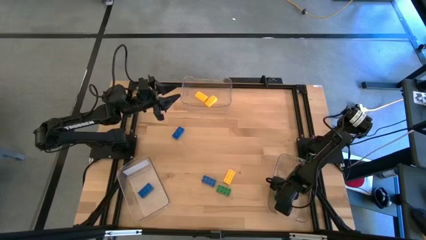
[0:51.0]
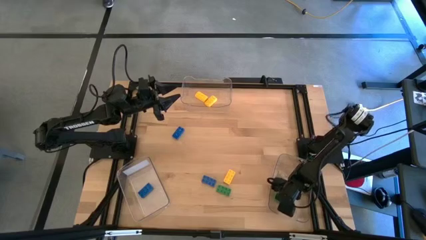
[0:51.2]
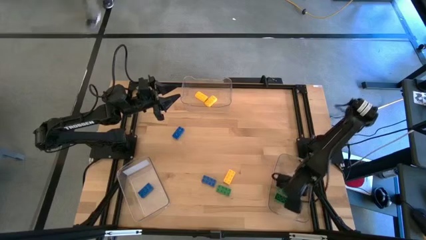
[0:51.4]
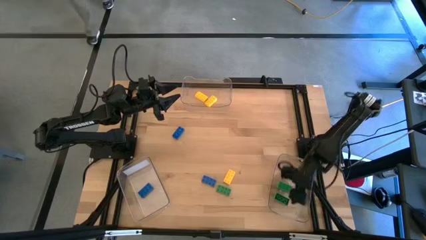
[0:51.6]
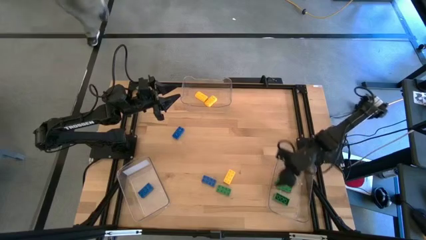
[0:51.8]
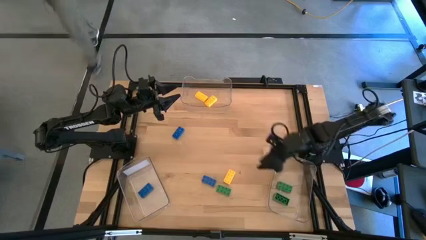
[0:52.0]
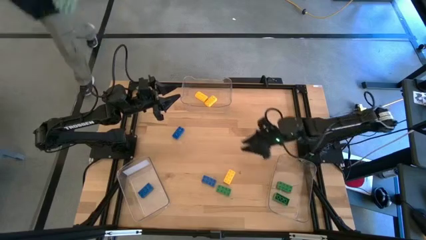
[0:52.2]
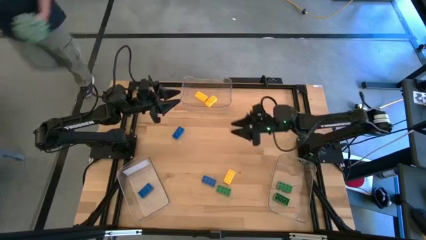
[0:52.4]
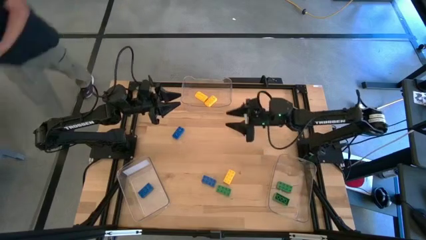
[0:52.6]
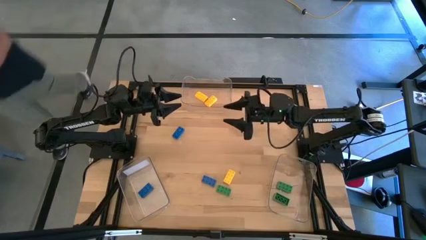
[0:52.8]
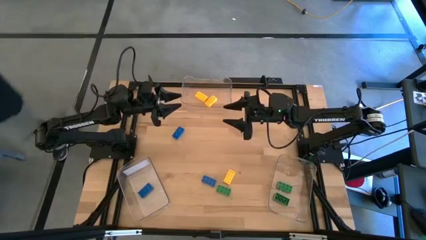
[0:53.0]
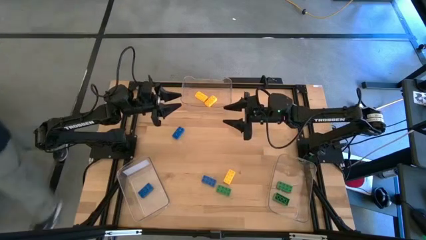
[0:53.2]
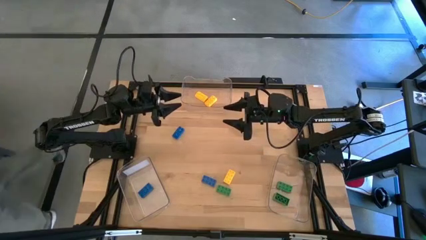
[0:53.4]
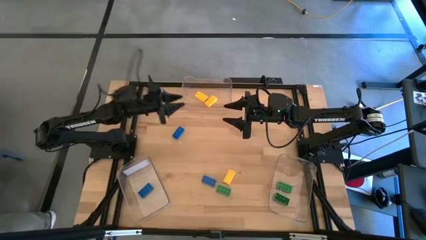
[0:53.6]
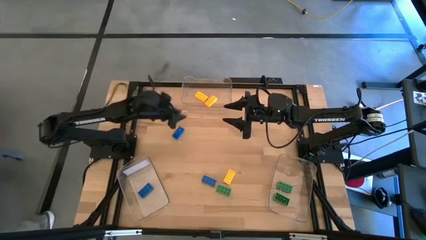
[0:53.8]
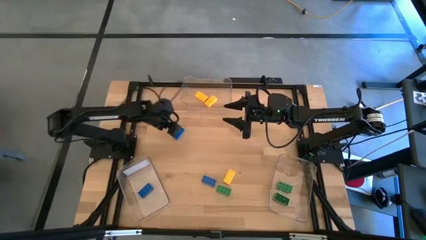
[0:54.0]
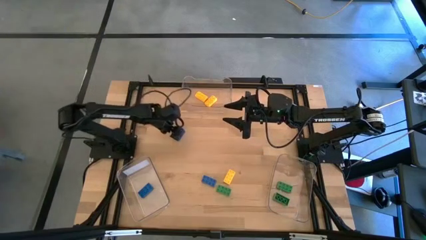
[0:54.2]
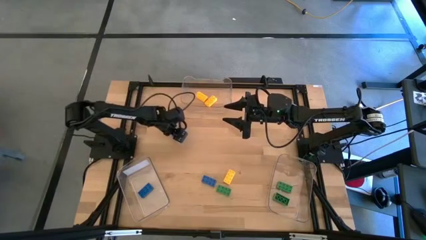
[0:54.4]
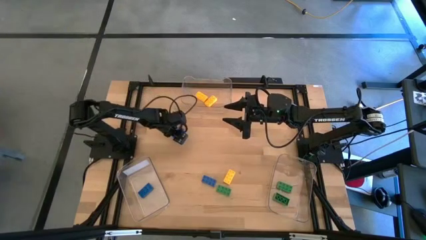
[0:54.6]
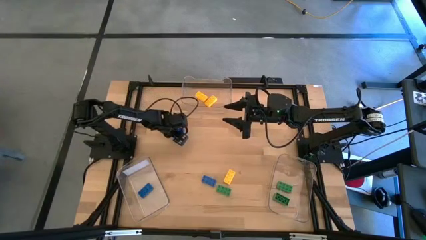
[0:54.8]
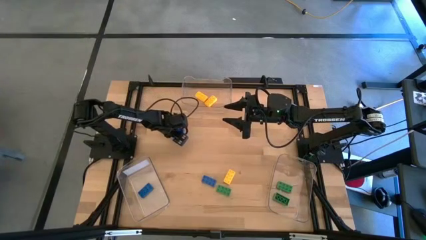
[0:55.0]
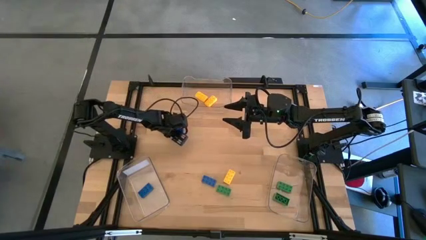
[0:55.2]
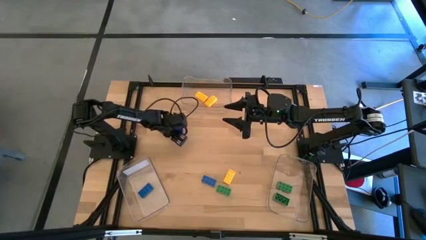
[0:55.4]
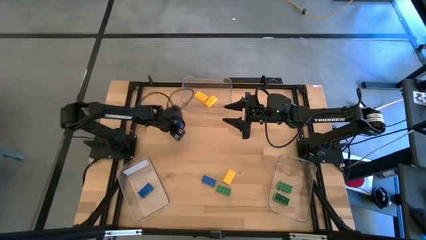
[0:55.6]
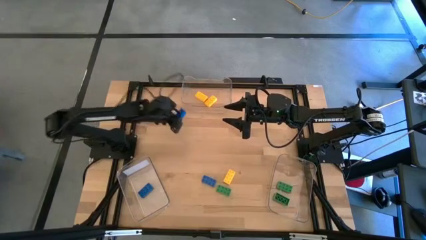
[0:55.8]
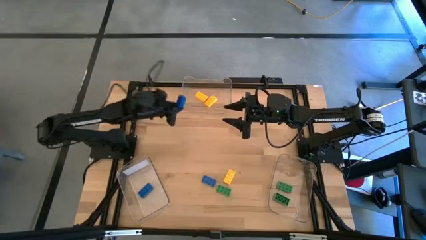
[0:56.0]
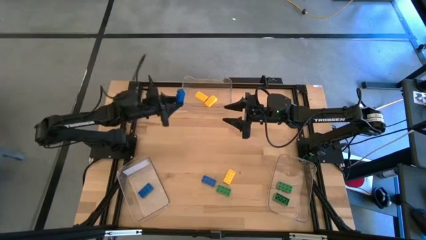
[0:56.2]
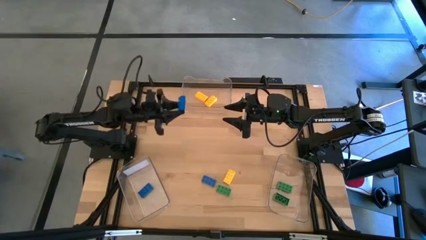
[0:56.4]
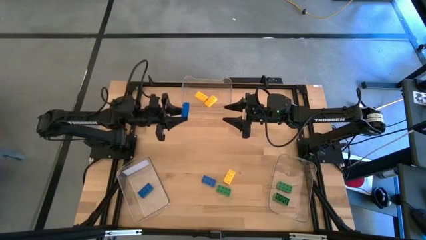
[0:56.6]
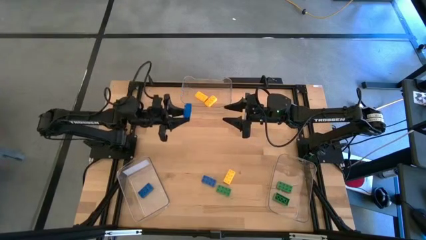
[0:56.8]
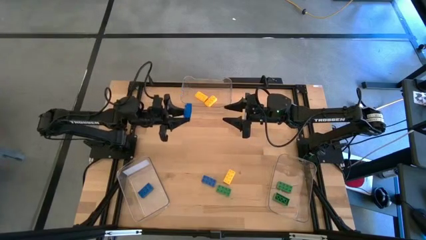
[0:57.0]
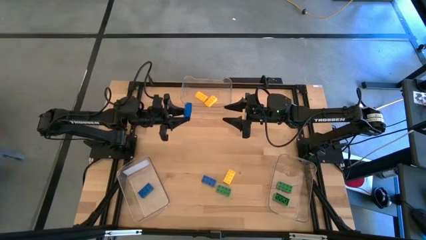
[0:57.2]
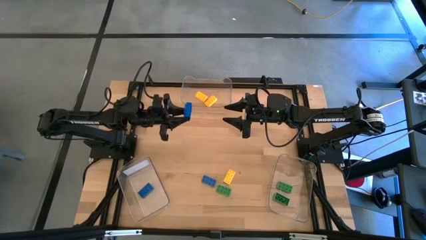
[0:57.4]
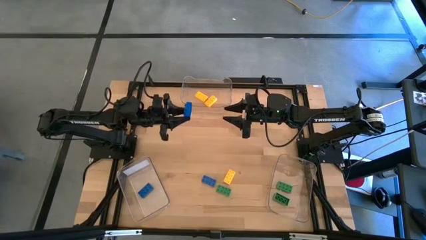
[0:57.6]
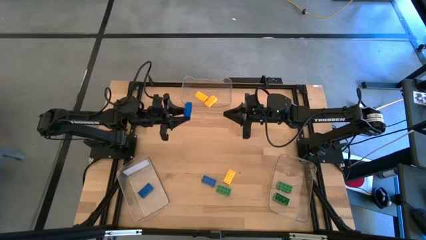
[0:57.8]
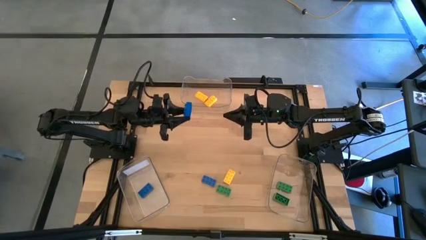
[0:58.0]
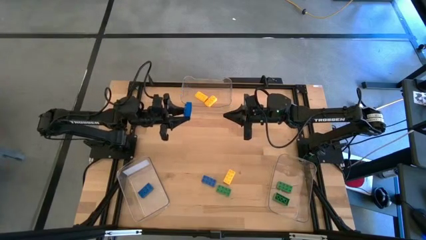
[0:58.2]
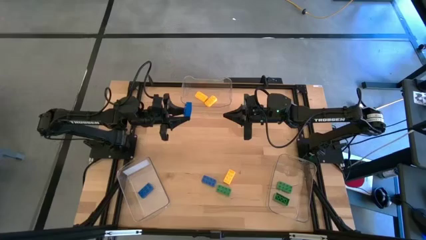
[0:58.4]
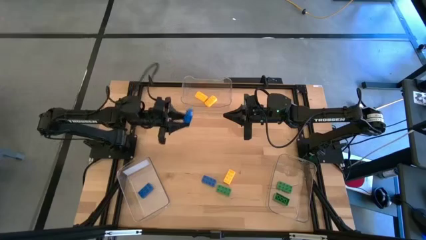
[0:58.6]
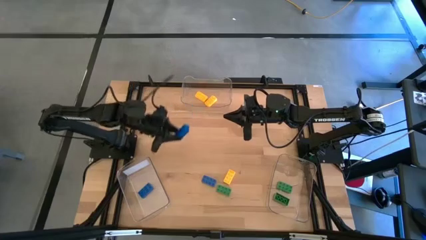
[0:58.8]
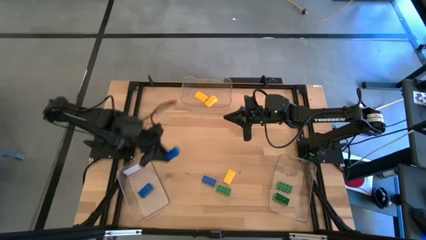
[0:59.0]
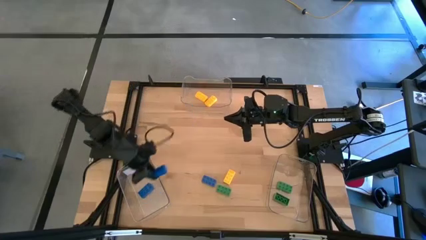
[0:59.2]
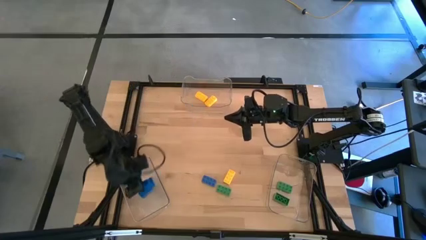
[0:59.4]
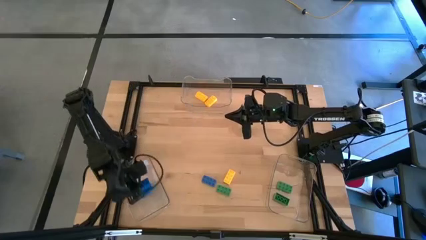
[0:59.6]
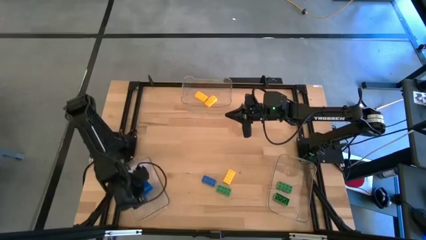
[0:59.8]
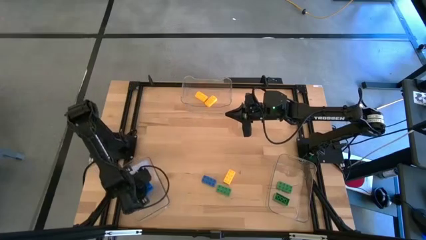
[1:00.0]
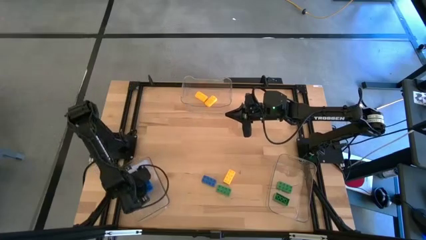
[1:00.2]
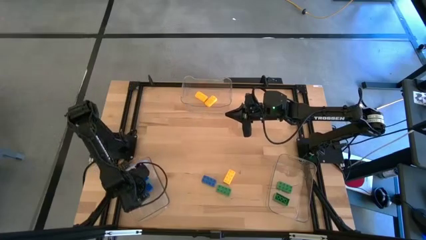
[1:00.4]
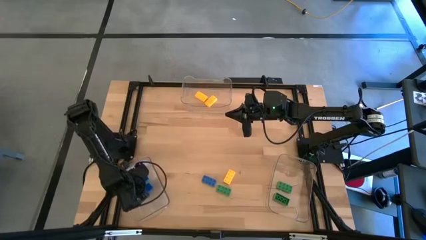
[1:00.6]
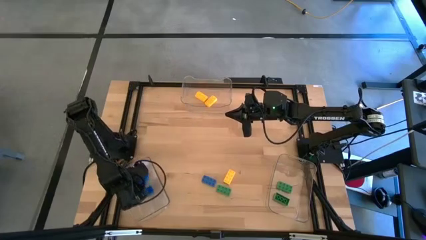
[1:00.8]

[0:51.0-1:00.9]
Task: Sort & place blocks by color
Put the top blue game piece into the bottom left transparent bin

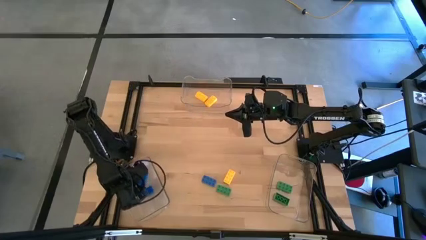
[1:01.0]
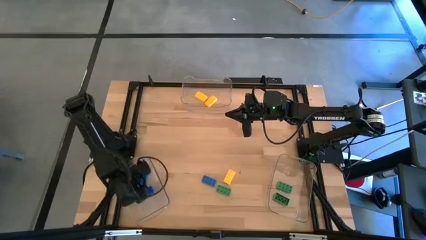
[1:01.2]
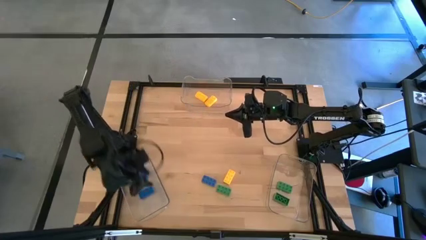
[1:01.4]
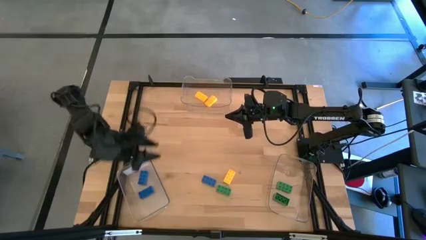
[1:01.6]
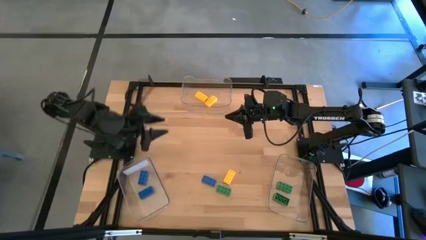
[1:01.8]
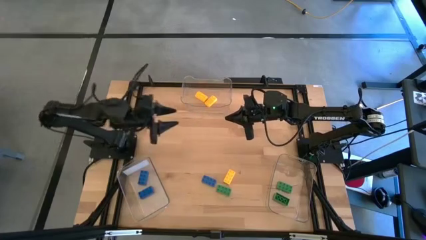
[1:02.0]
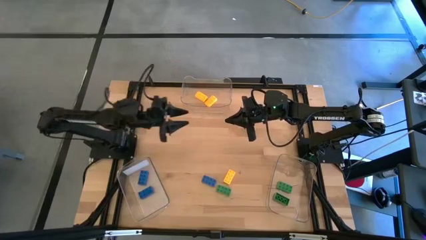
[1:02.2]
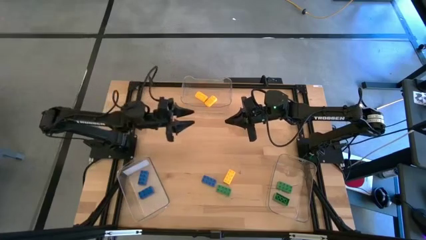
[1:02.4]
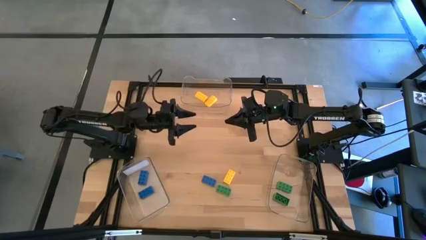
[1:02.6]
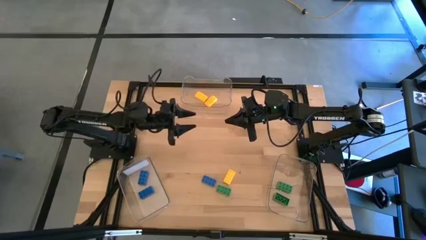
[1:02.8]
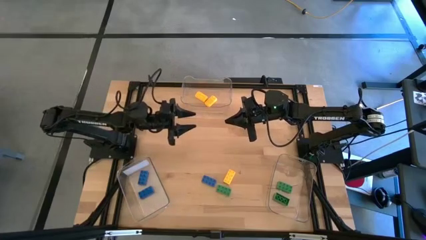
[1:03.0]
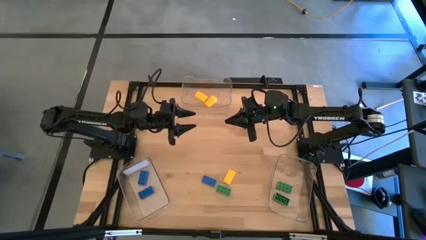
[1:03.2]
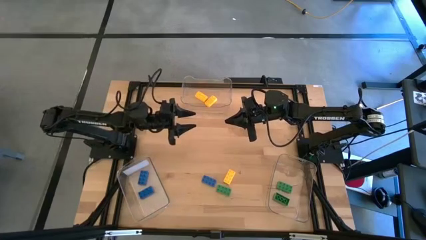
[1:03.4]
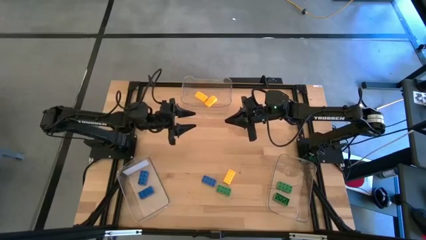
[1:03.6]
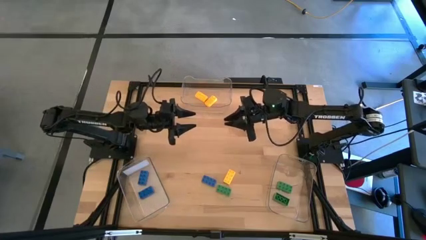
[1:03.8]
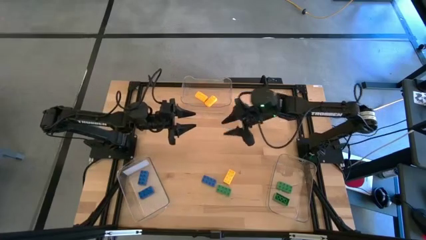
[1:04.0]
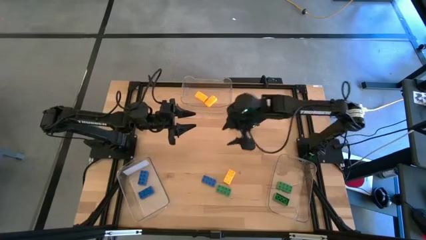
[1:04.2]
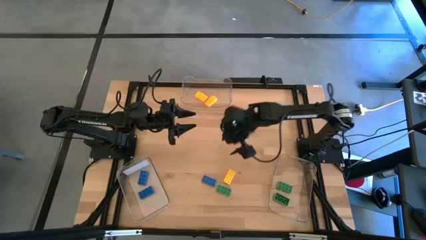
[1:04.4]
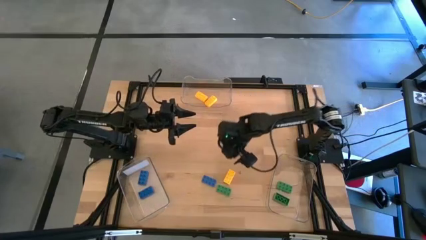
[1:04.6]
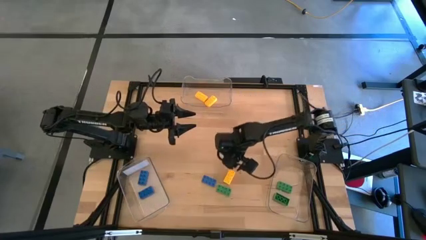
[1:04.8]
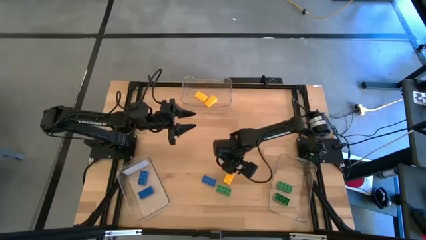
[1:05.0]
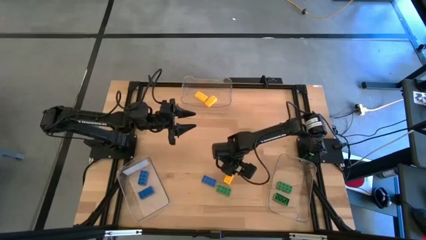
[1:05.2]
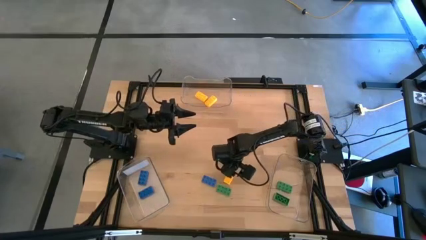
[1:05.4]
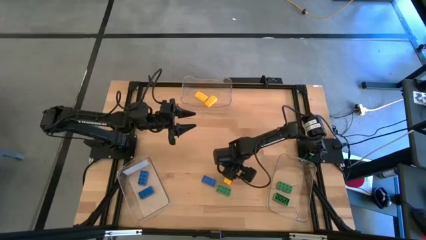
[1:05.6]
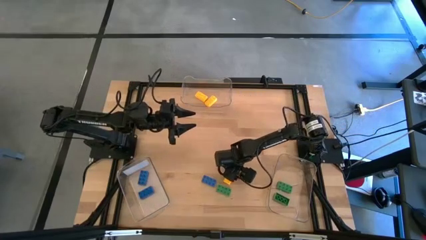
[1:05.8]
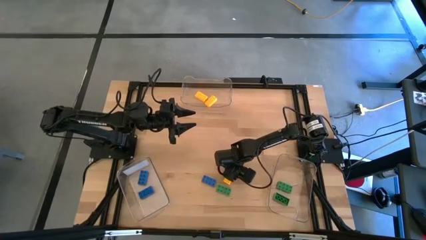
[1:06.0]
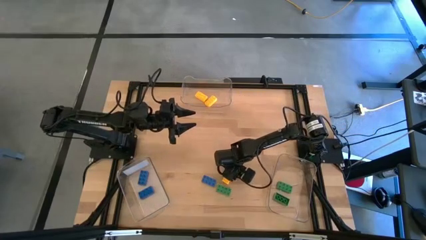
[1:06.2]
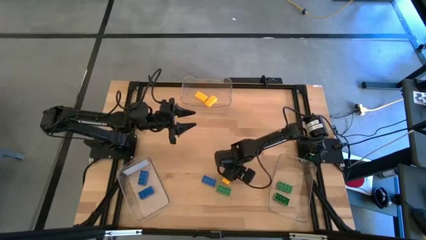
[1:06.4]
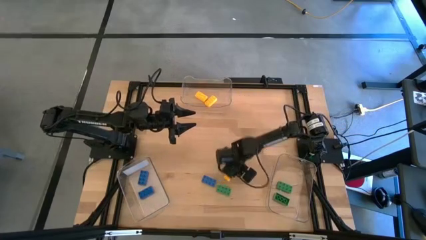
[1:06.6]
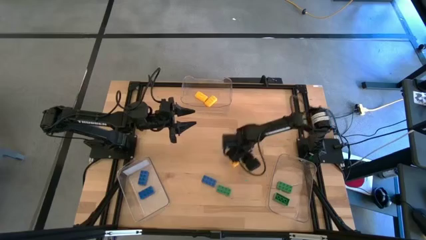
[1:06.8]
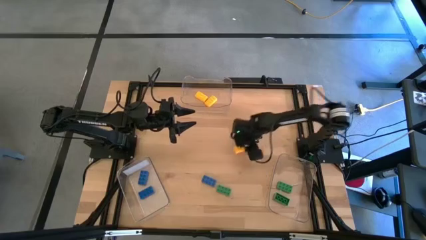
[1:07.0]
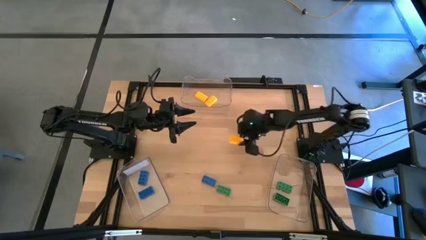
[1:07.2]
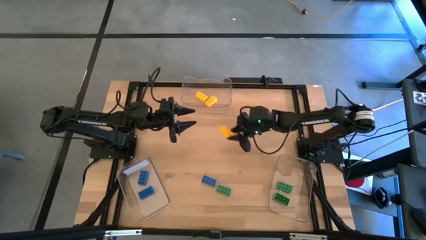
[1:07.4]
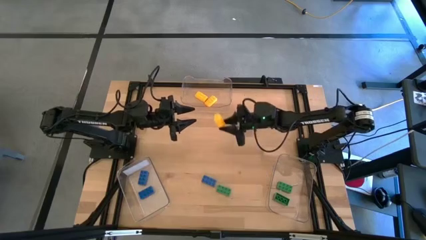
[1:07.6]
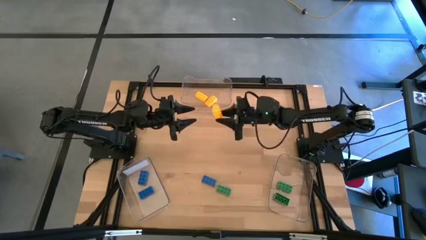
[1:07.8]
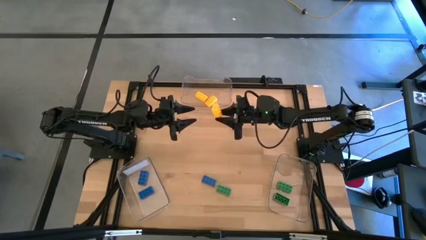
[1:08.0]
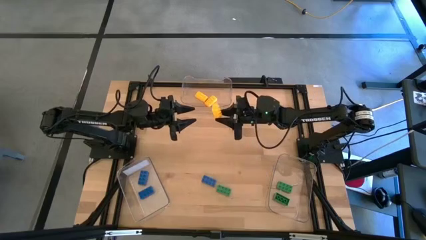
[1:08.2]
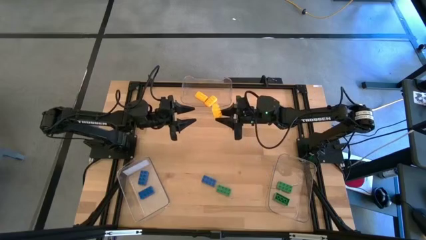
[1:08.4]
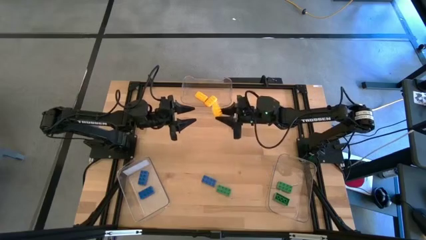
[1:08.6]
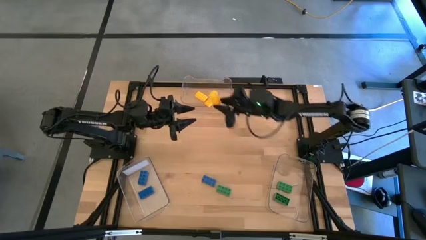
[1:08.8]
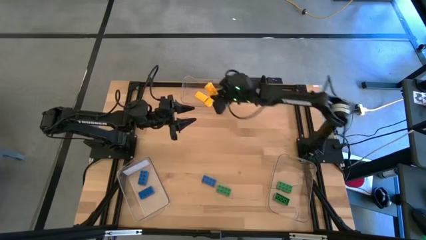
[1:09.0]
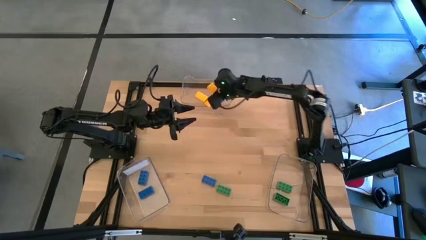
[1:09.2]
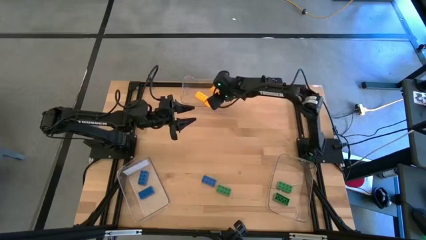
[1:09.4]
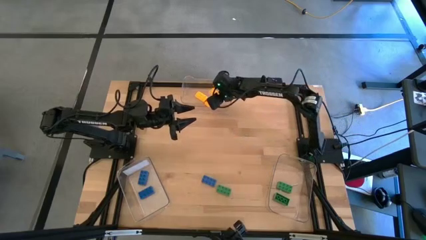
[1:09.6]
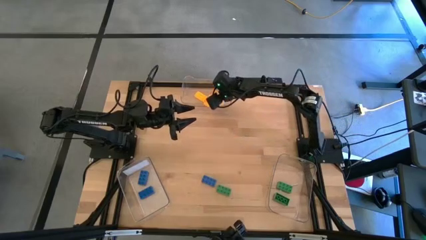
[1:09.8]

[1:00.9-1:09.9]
Put the yellow game piece into the top transparent bin
